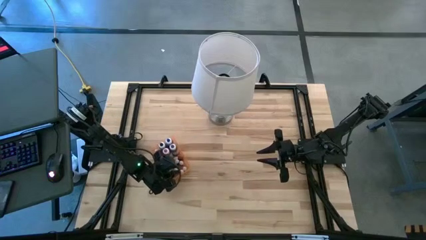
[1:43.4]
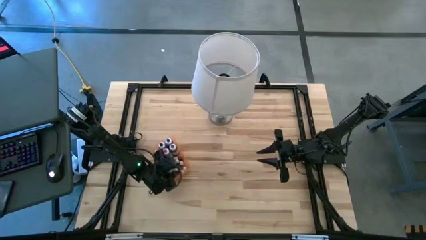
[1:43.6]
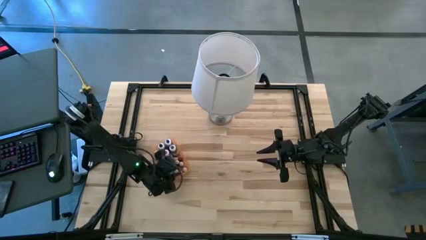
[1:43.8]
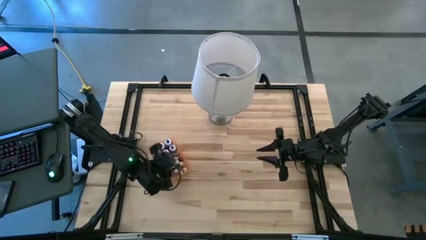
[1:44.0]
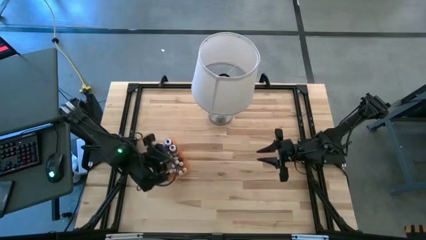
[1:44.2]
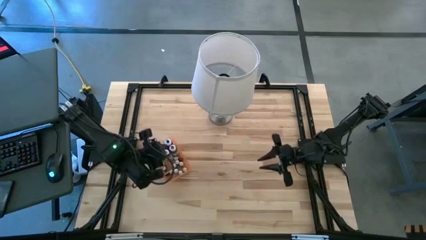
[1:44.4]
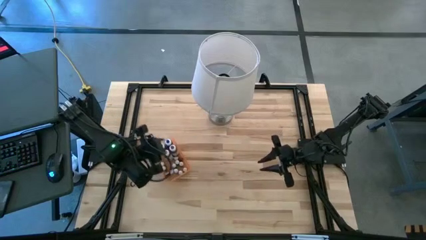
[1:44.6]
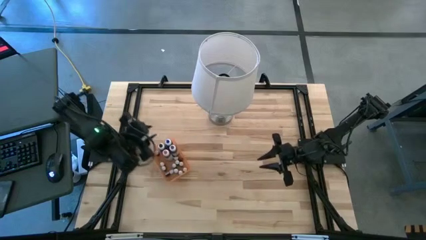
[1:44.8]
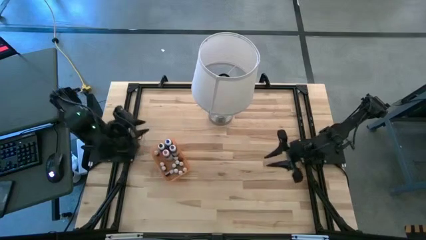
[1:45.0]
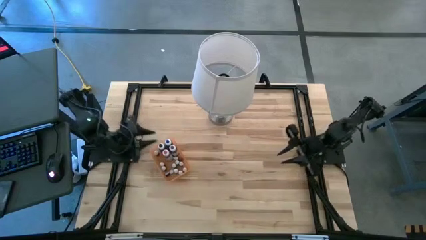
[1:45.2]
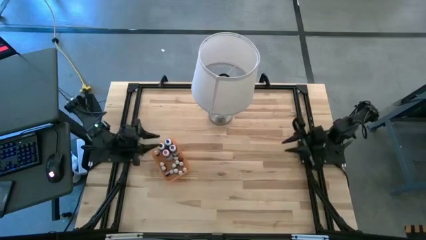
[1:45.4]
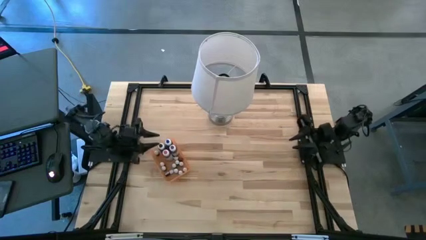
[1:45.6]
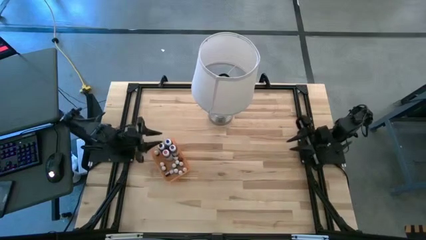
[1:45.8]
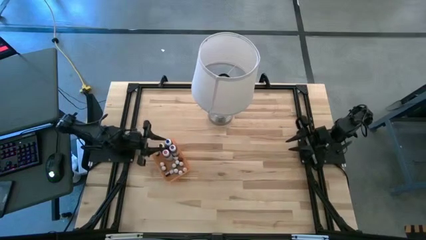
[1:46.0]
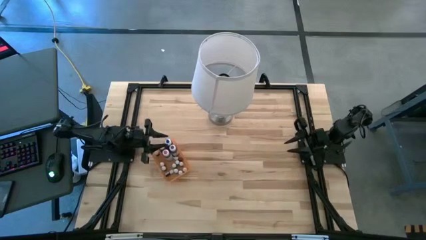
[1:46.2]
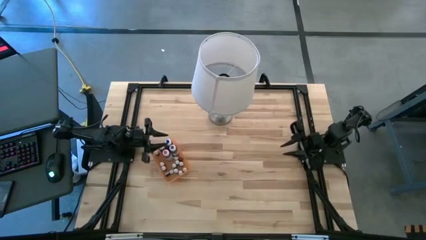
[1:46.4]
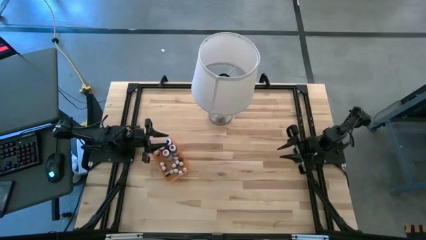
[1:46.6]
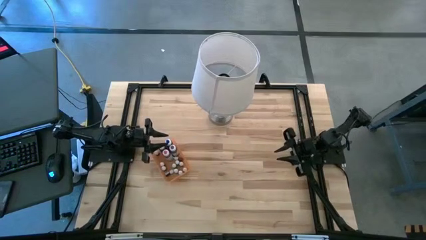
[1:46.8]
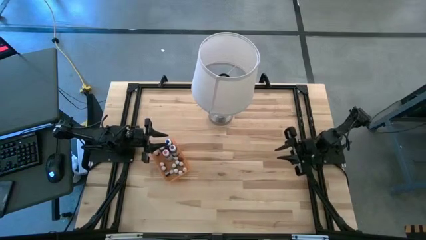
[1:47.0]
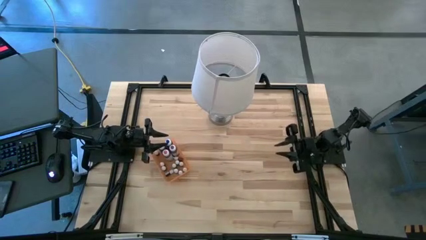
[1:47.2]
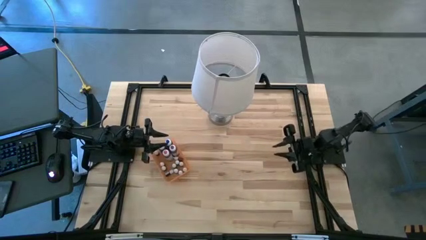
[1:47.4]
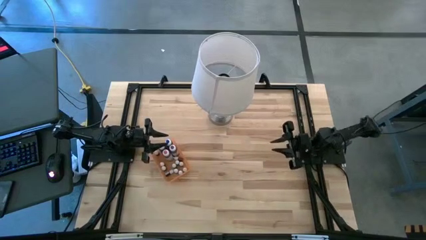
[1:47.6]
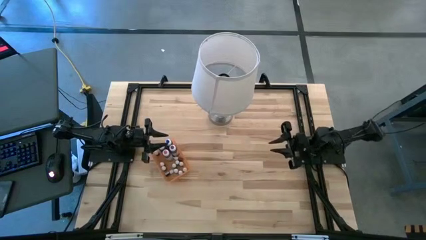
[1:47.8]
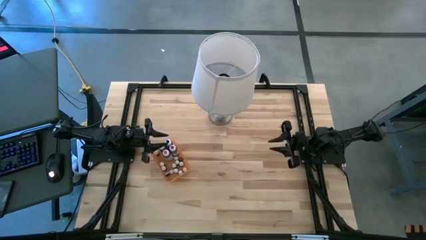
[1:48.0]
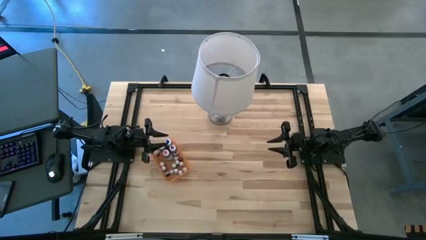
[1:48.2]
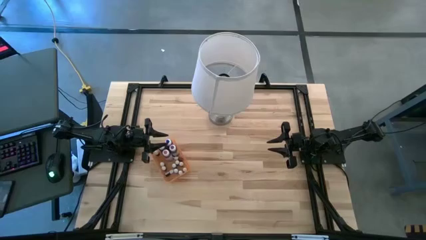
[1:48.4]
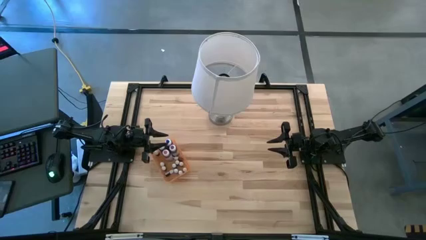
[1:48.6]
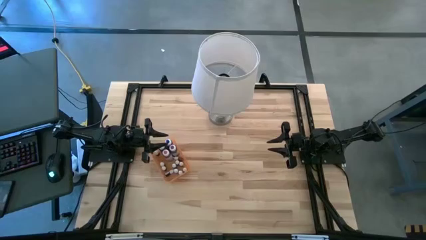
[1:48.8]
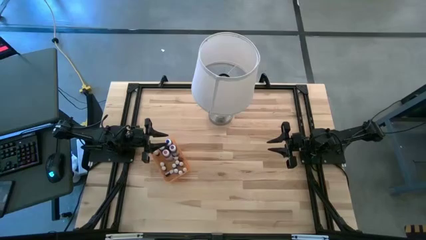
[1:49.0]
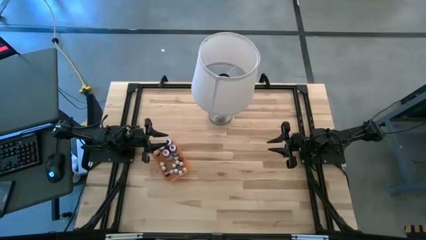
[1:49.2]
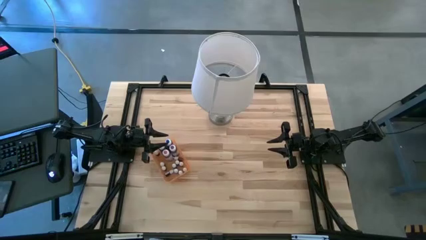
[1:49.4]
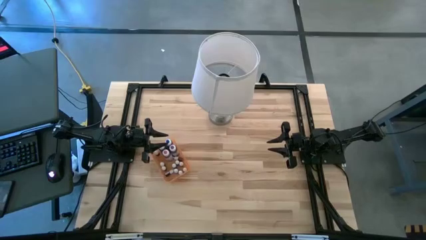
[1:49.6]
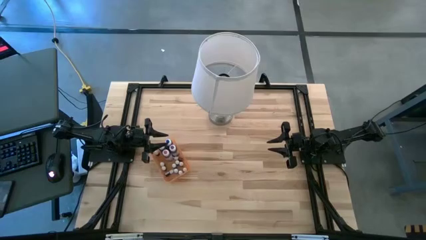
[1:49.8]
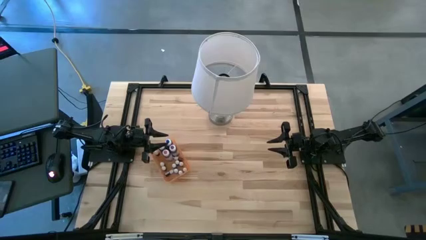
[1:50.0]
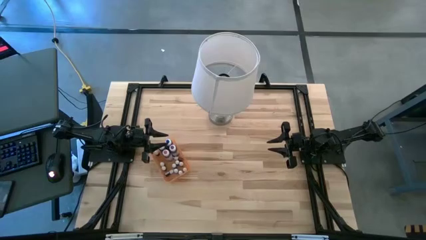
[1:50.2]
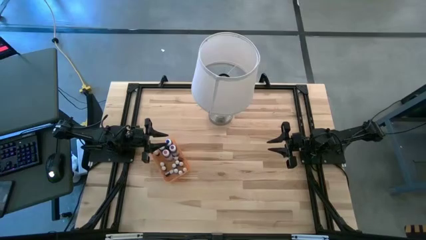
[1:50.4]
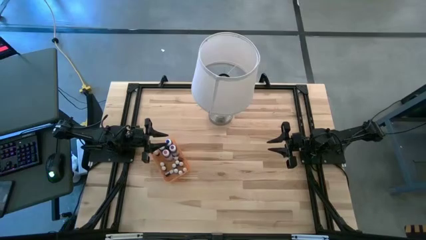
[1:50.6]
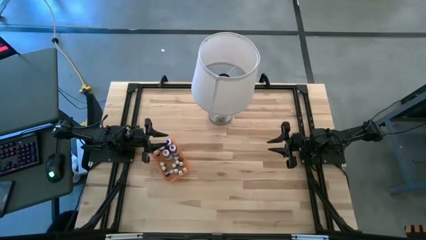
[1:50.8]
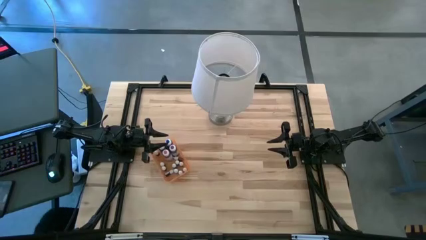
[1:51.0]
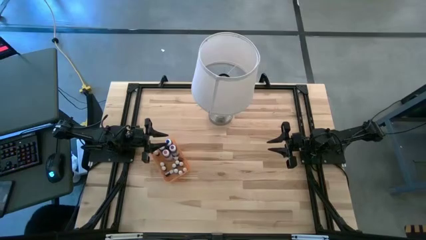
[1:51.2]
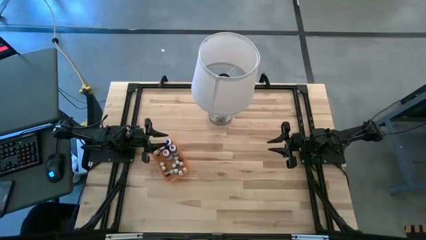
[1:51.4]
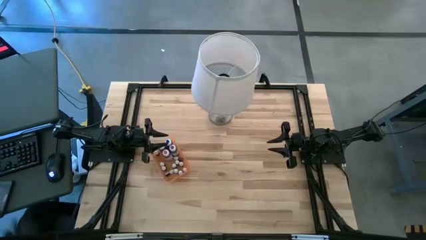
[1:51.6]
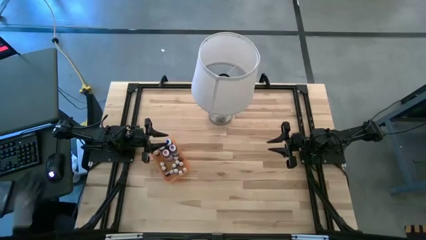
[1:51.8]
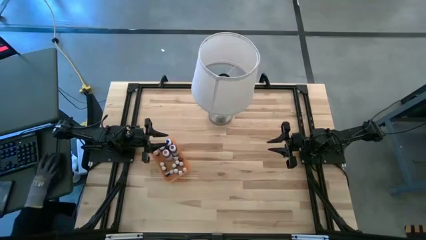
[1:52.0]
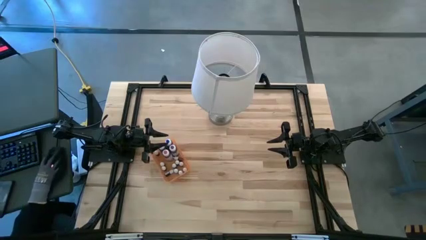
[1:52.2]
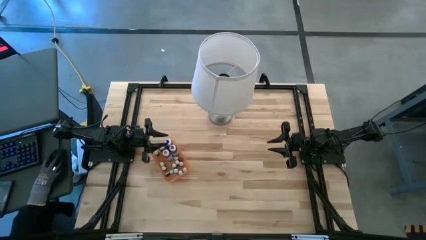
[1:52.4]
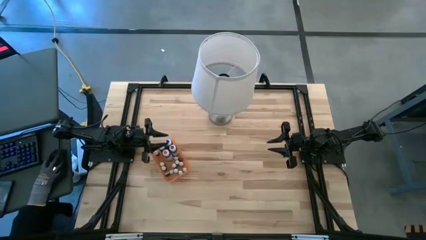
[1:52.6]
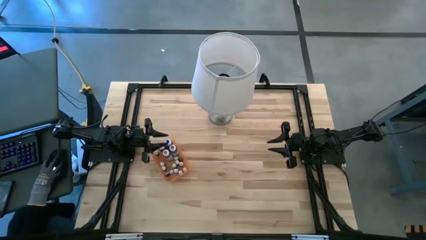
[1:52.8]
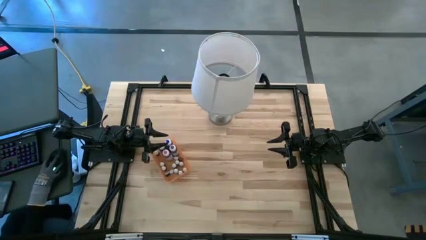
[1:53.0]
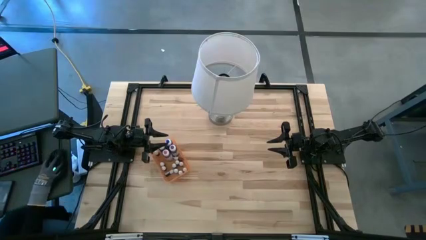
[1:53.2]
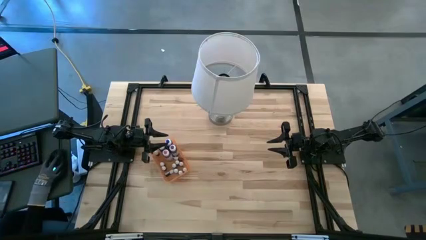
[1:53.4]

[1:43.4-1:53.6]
Task: Pick & Place food coloring
Return to Home Position

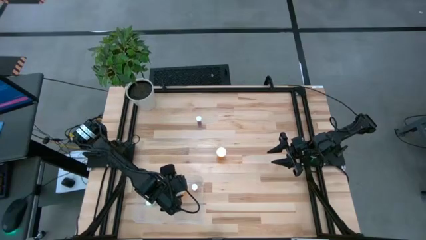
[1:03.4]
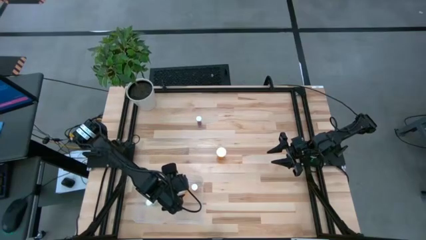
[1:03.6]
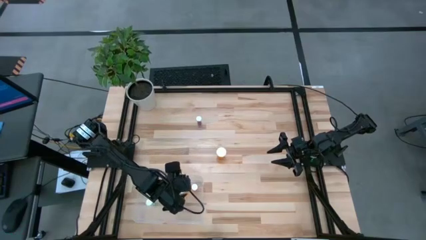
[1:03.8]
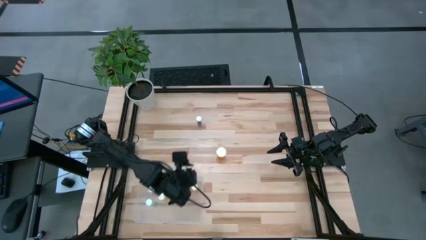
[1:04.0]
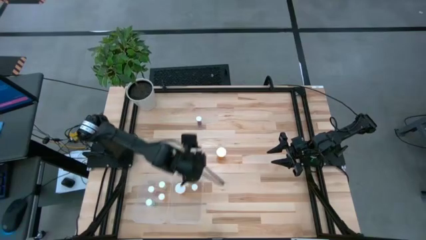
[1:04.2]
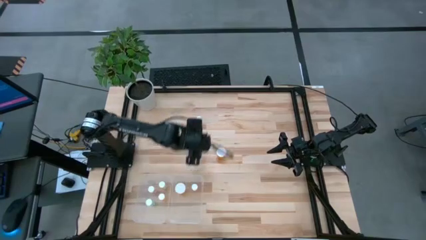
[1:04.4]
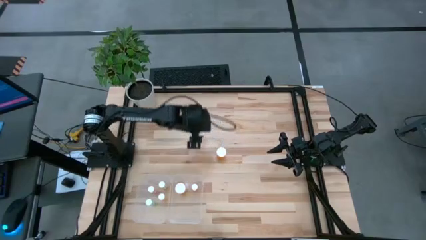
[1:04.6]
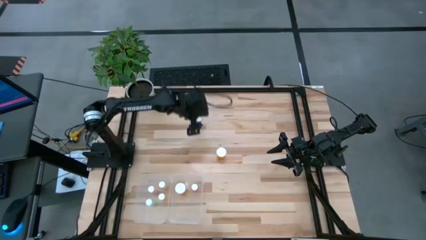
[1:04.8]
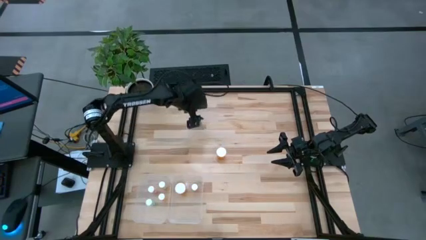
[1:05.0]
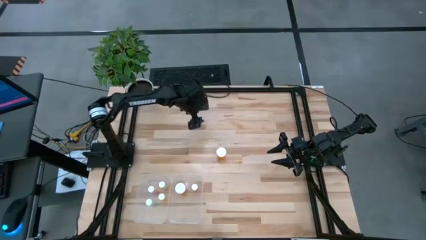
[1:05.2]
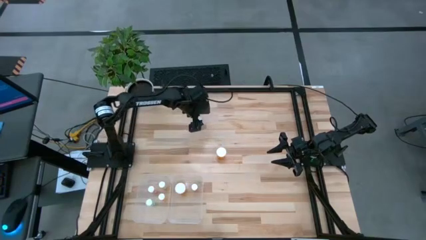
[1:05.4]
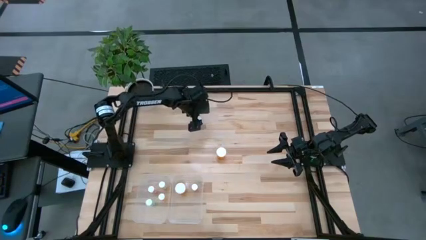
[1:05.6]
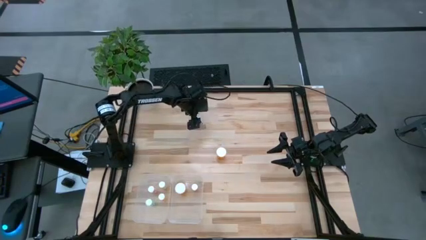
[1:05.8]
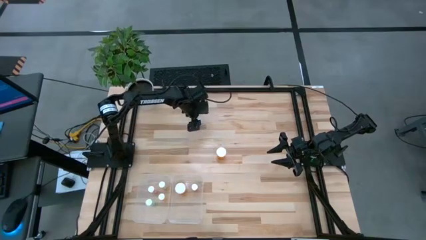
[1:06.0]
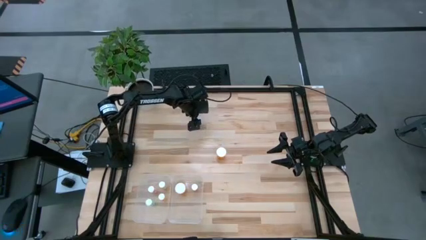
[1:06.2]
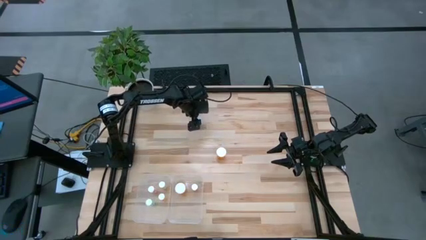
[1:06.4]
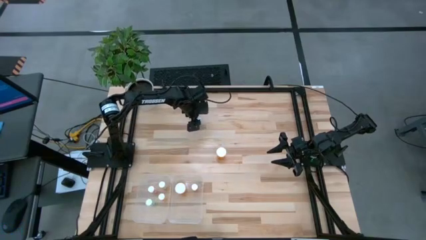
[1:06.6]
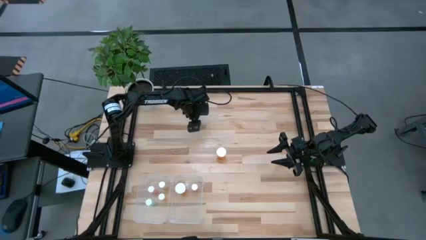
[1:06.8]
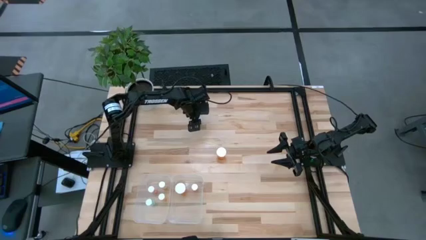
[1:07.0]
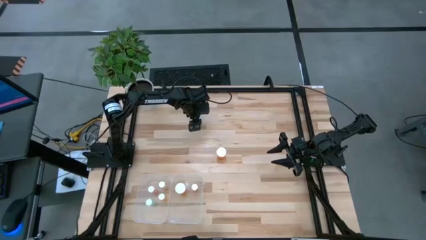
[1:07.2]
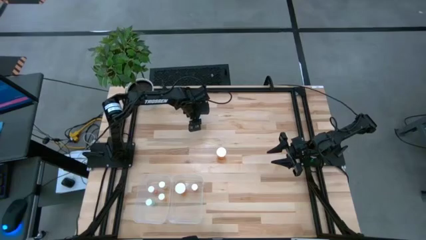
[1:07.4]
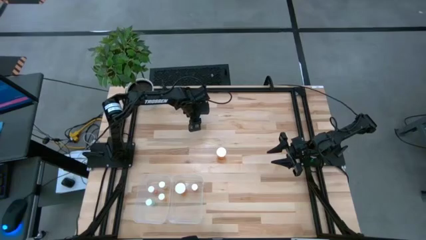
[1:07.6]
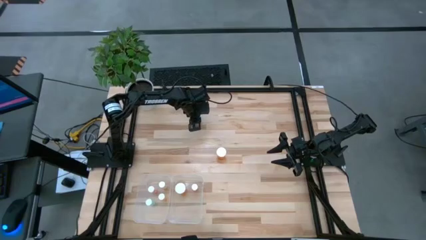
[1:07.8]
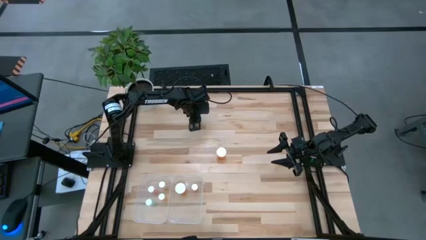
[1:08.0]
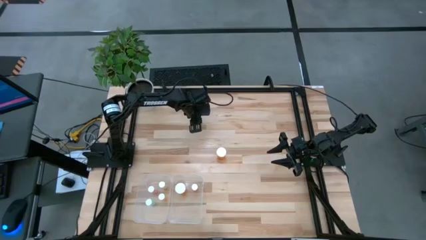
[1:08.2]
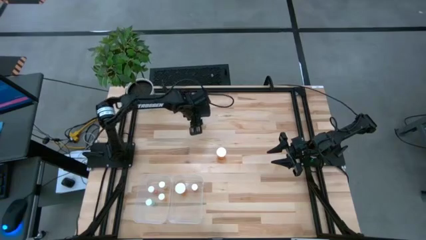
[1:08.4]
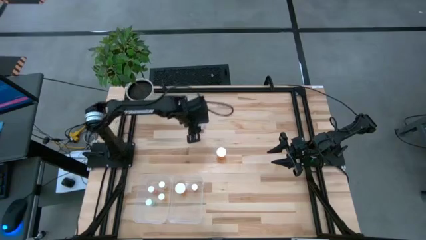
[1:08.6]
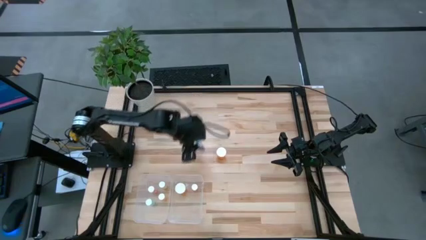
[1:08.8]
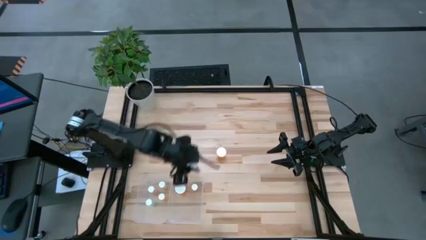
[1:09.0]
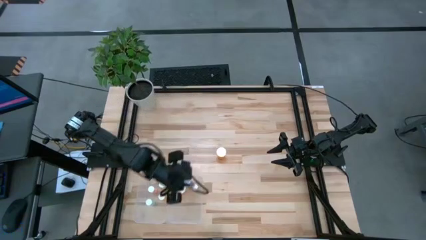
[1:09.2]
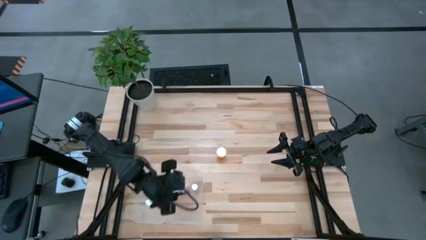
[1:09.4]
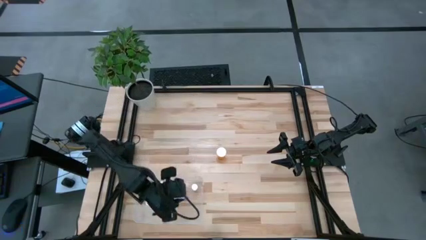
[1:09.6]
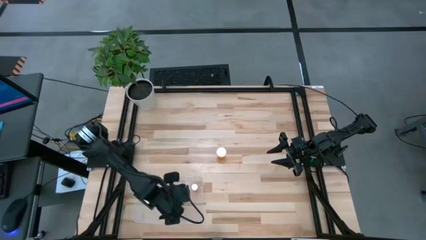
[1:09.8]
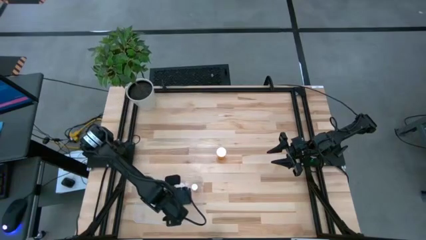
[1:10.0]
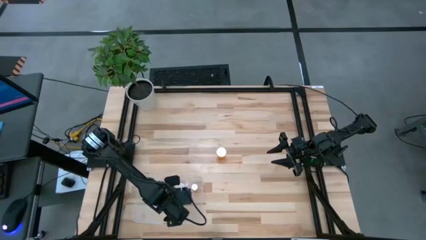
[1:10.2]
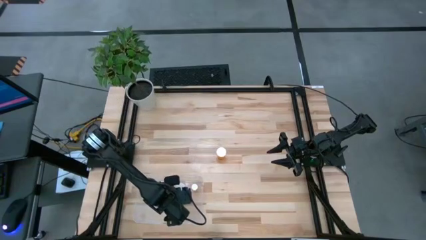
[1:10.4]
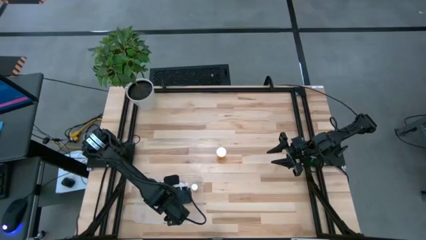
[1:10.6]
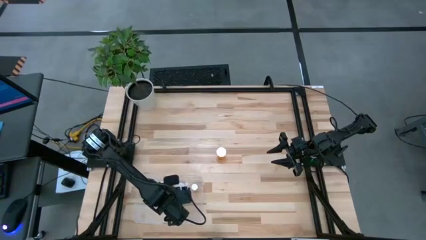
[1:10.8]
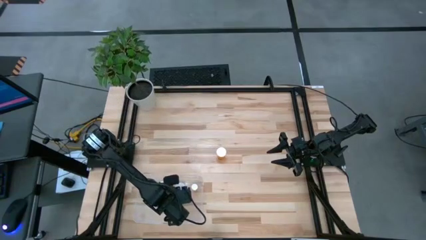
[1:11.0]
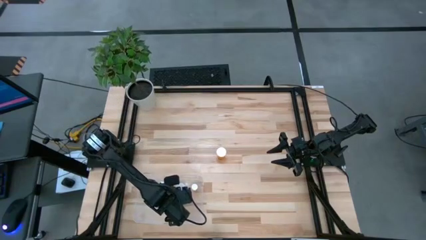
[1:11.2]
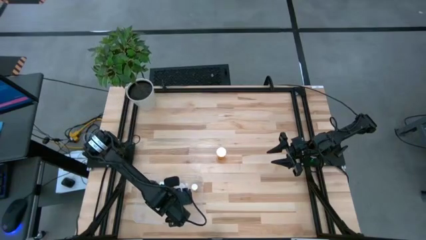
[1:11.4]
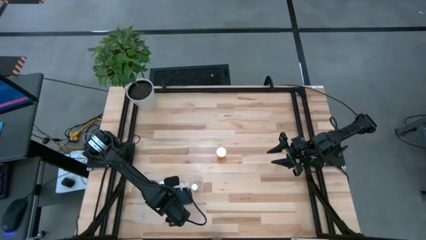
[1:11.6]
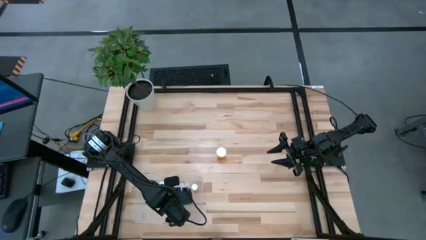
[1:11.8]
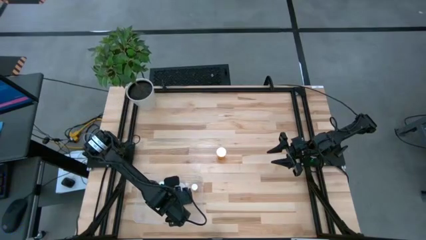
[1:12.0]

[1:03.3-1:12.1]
Task: Pick and place medicine bottles into bin by pill shape (circle, oval)
Put the small blue capsule bottle into the right transparent bin
